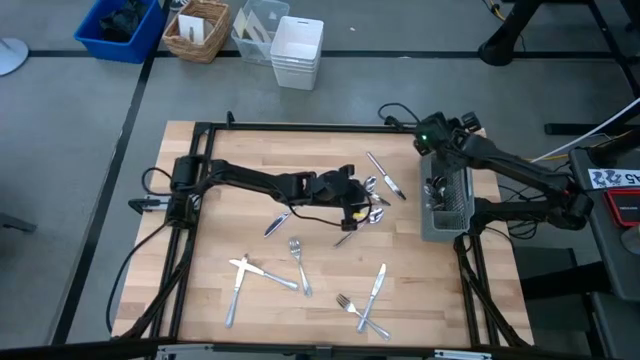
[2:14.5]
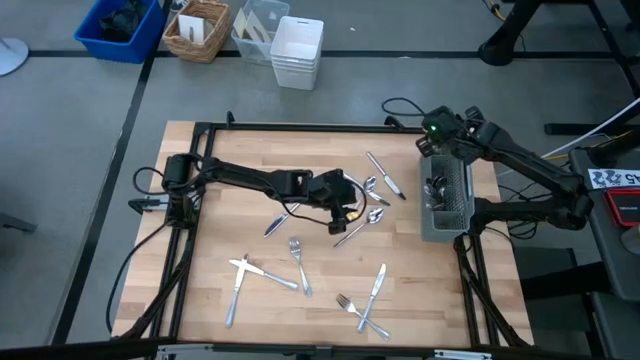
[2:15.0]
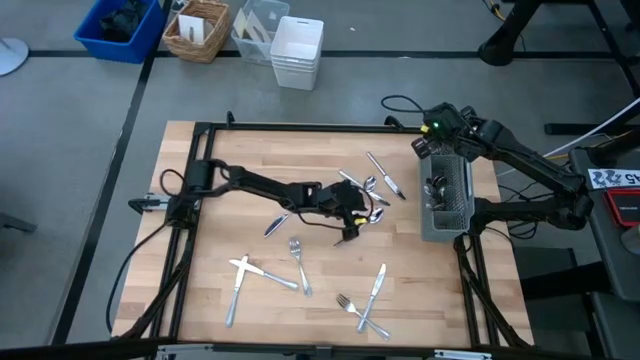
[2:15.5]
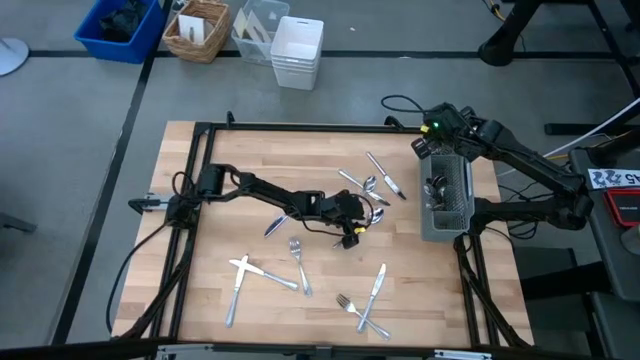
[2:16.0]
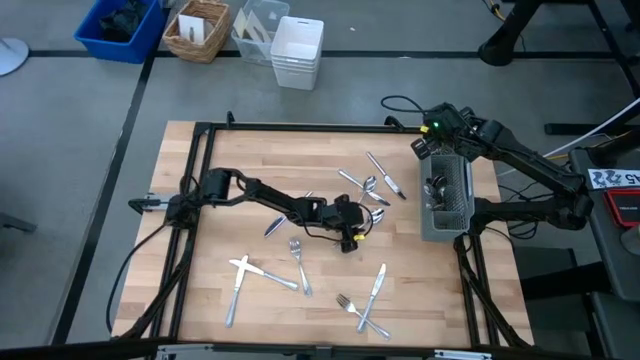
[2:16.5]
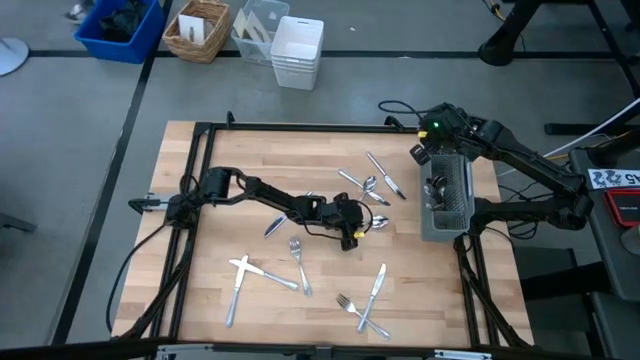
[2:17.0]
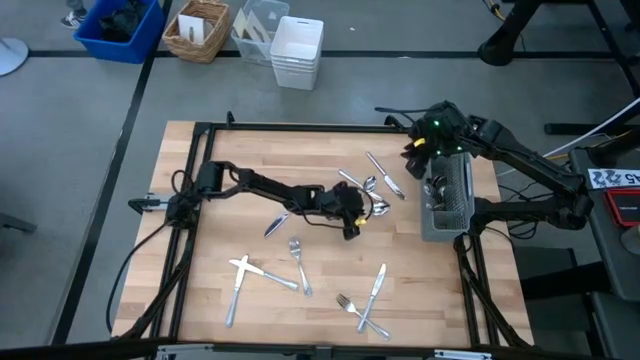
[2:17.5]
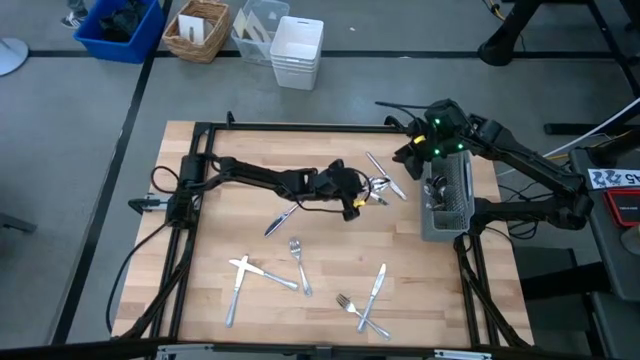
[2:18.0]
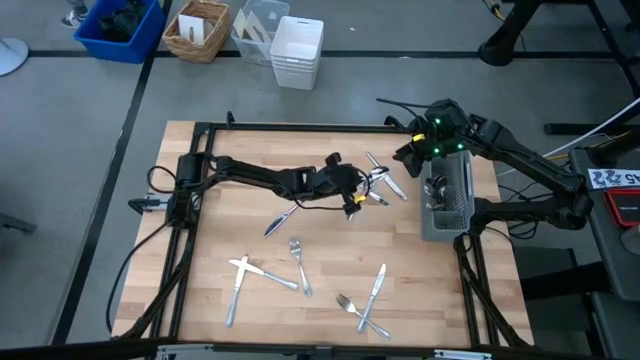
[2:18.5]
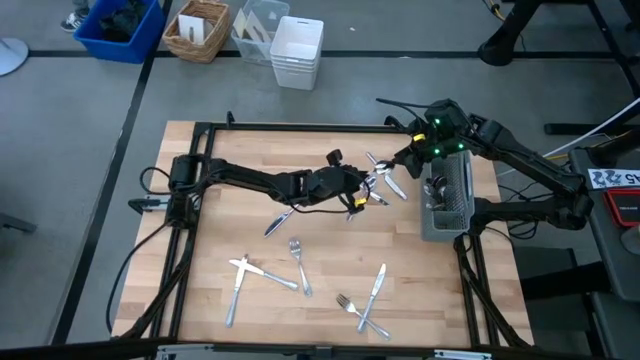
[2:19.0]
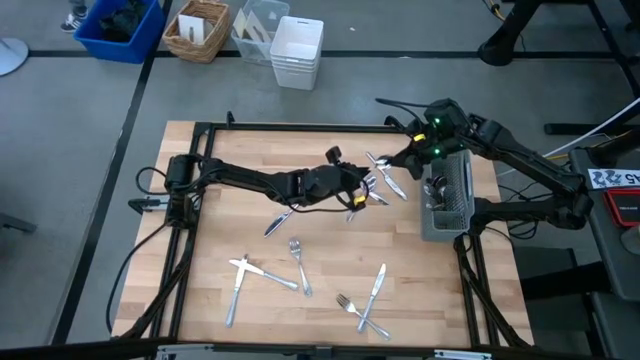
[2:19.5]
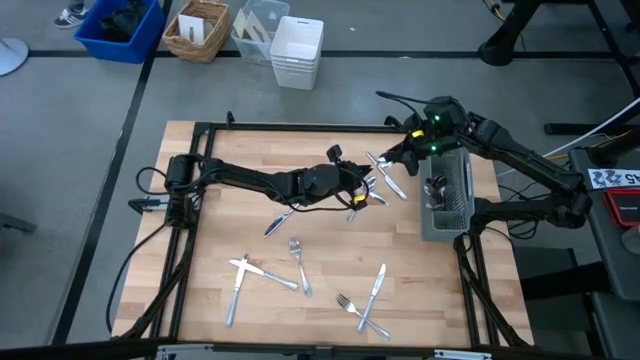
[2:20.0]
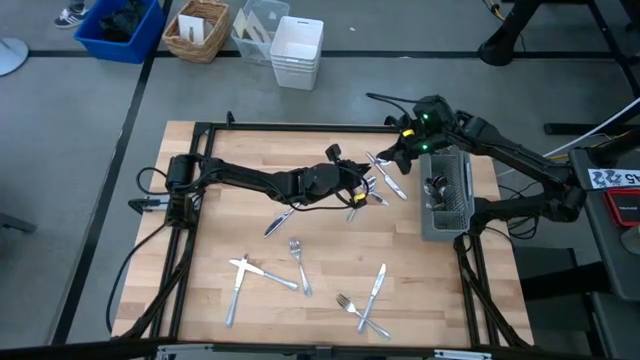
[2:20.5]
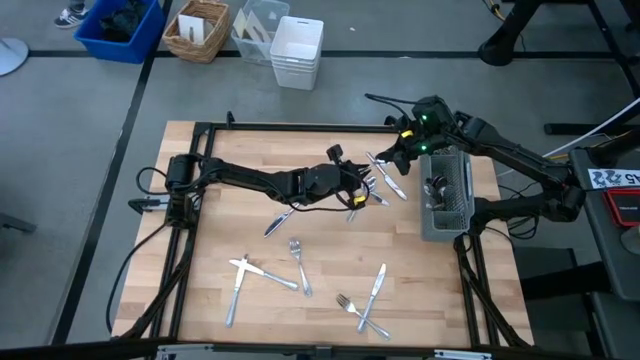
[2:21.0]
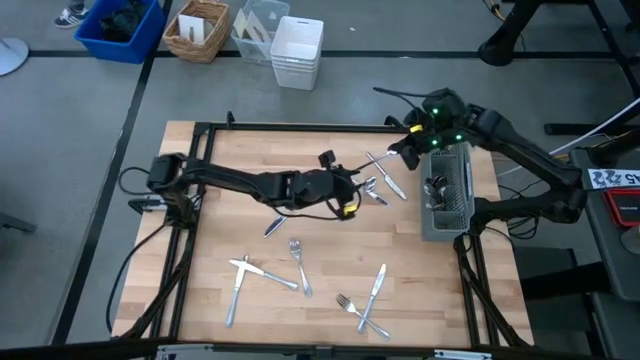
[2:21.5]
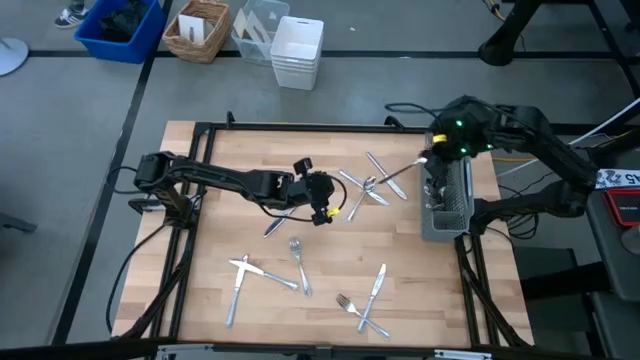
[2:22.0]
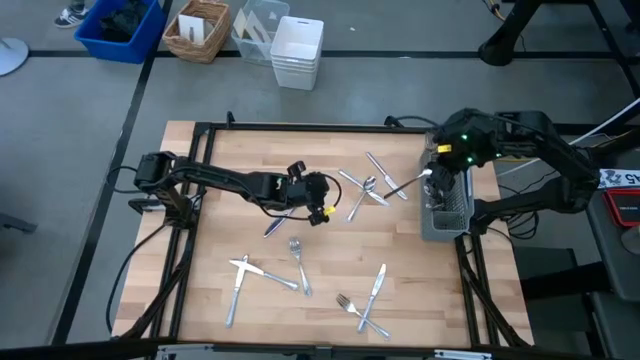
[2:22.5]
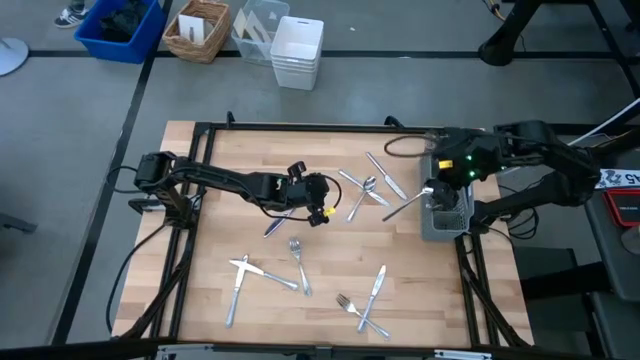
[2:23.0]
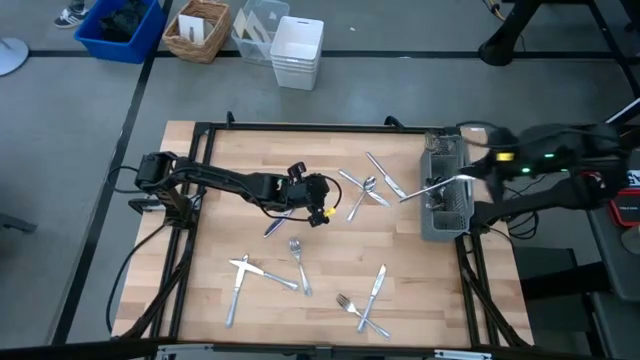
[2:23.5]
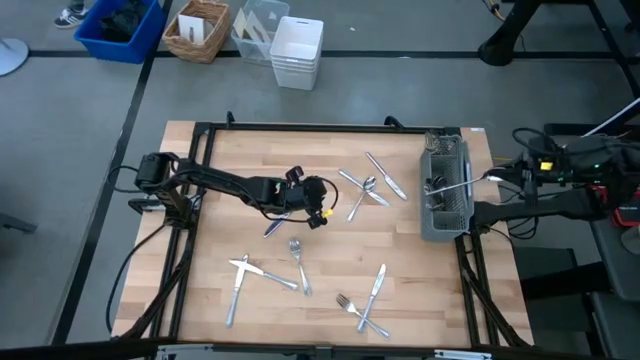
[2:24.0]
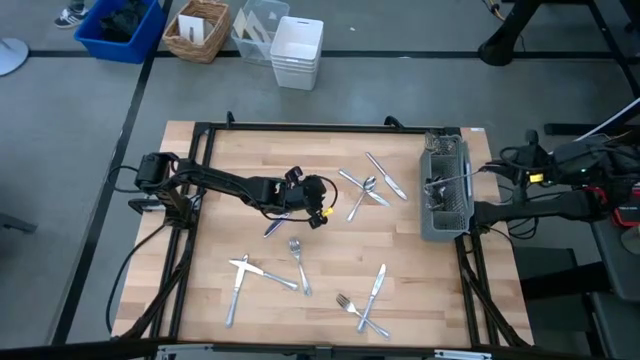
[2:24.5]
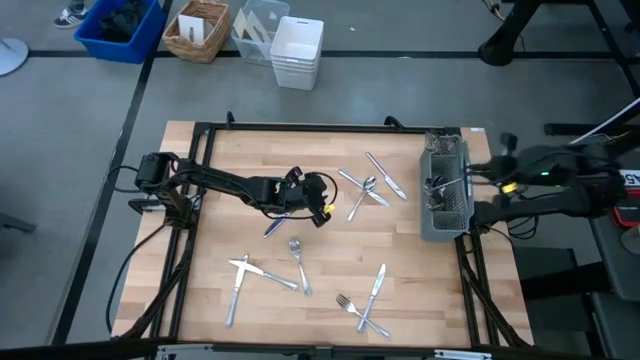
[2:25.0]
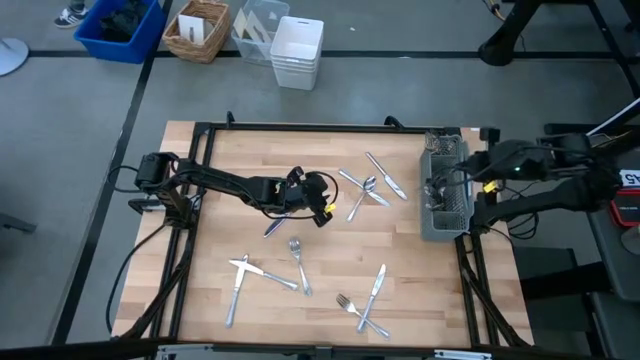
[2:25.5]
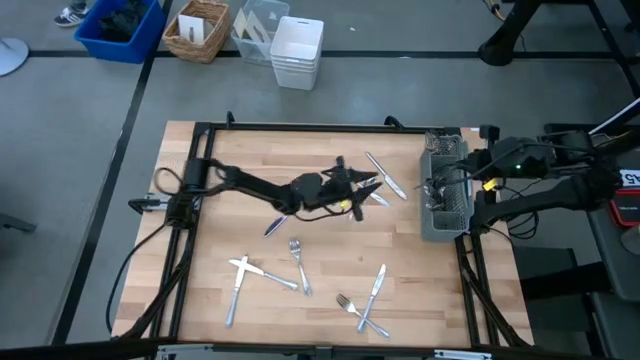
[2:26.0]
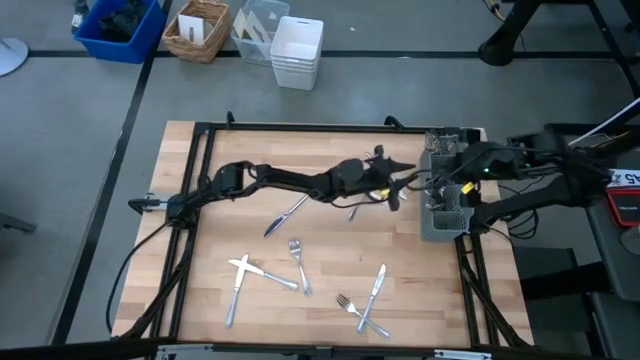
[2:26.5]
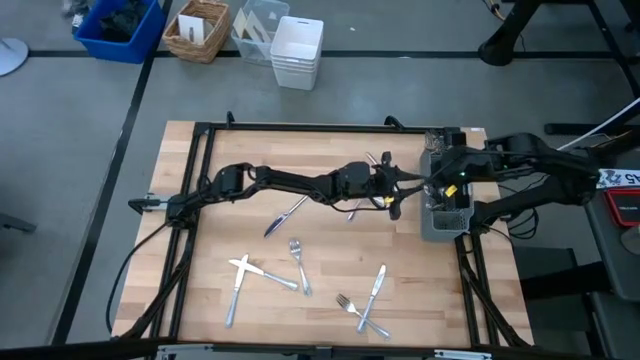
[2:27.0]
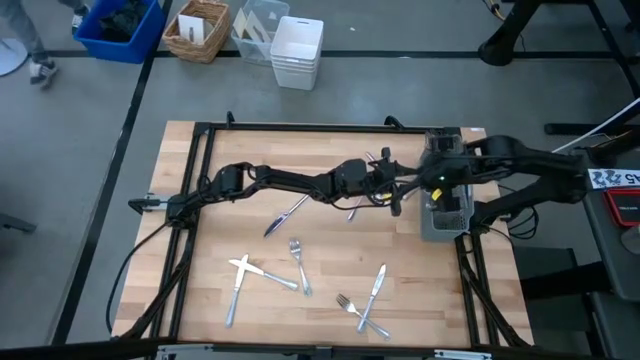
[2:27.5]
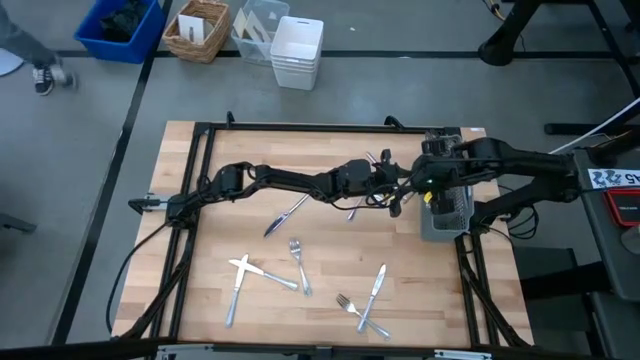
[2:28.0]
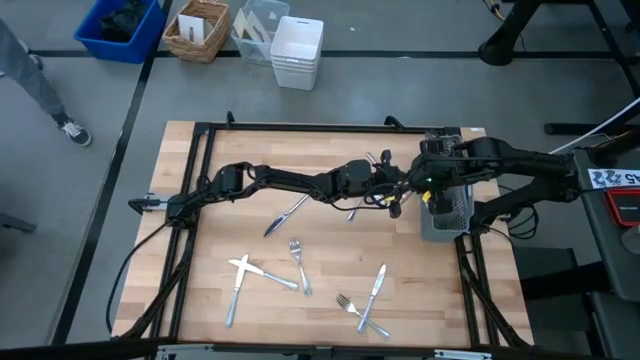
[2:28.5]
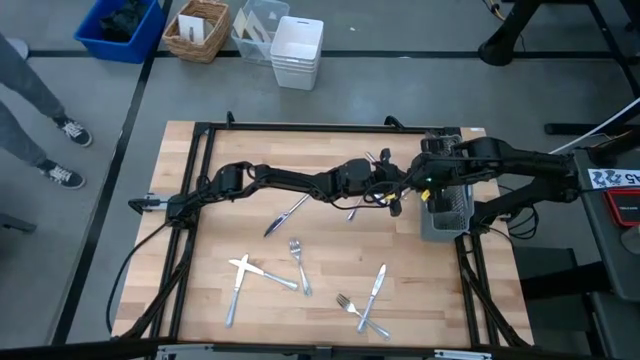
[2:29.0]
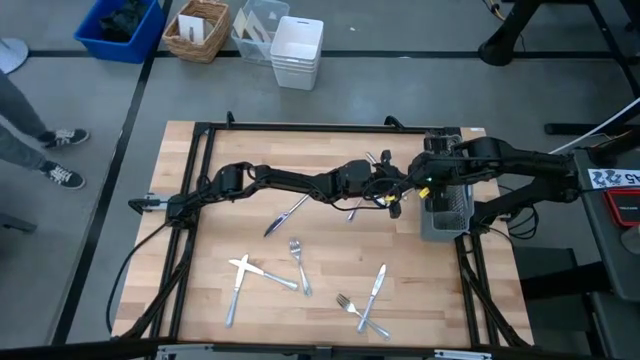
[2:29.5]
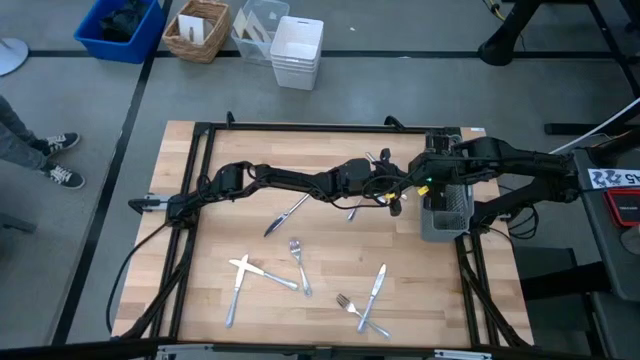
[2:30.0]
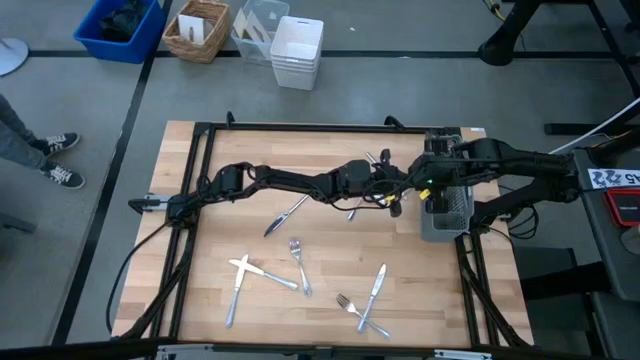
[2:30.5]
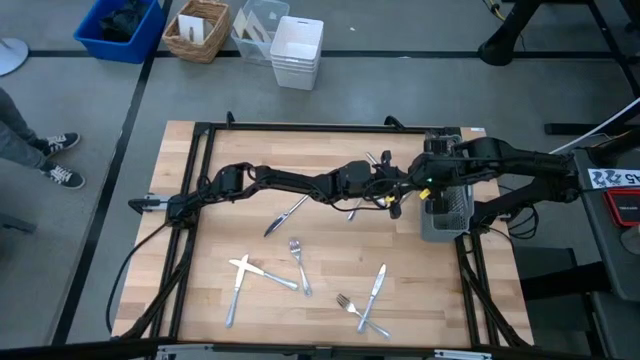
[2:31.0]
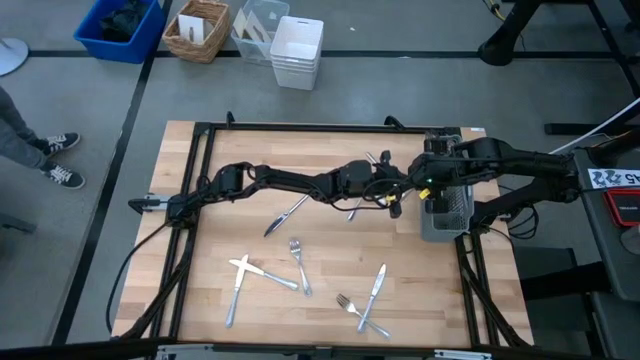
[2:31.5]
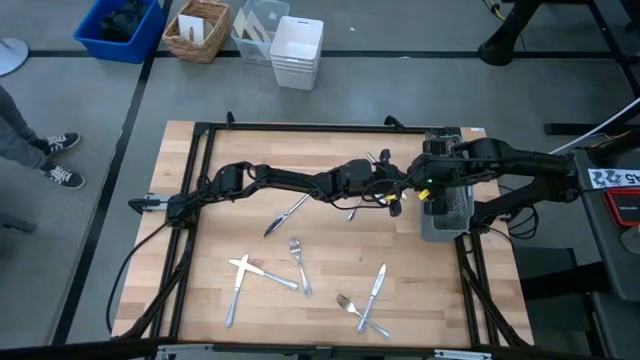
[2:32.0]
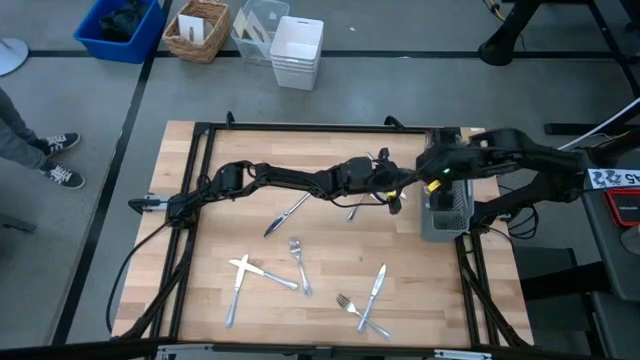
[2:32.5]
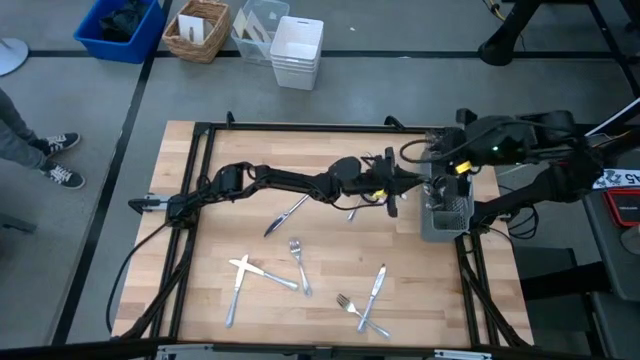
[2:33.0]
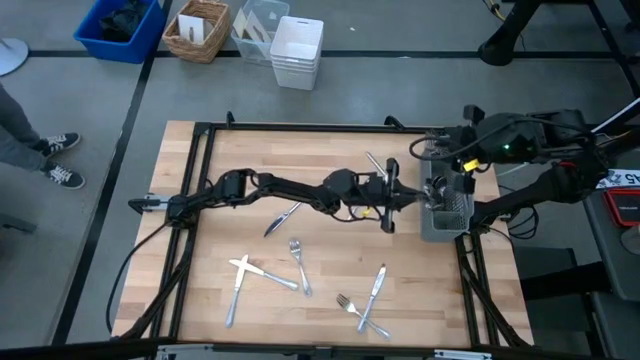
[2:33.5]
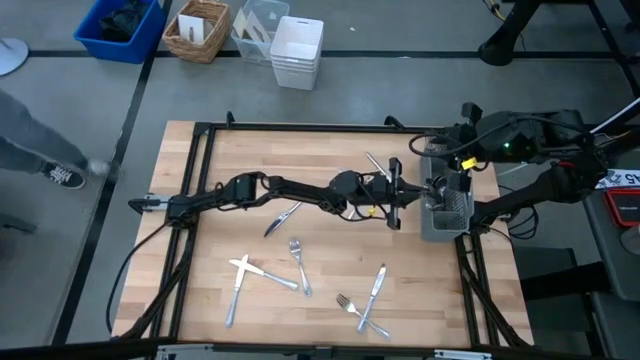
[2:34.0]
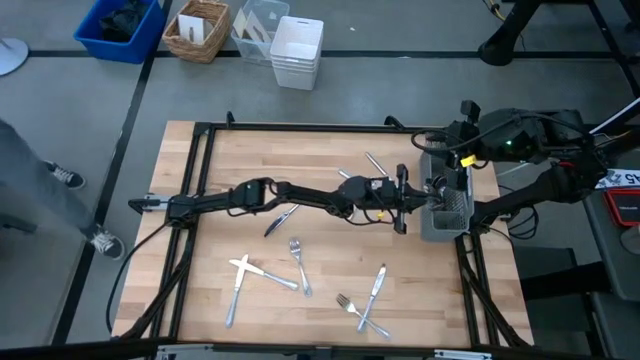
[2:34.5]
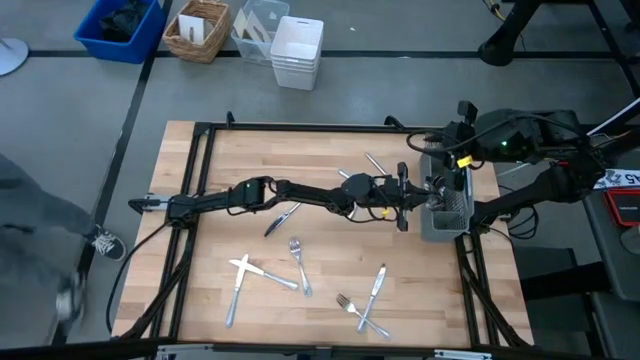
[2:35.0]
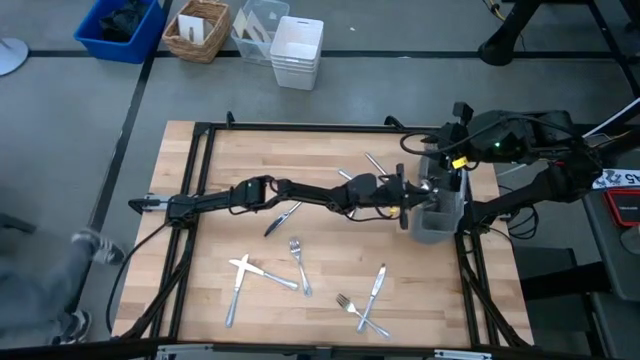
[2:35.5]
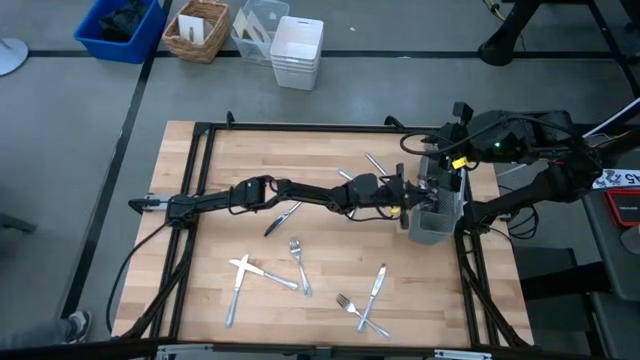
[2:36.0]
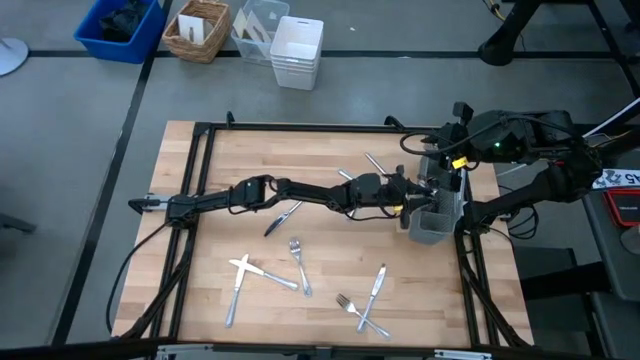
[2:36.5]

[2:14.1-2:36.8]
Task: Sort silverware
Put the bottom spoon into the right section of the utensil holder
